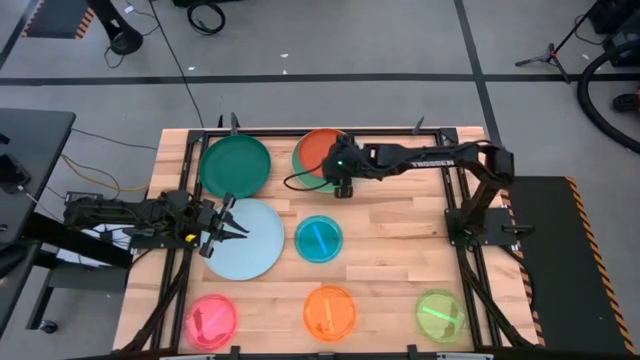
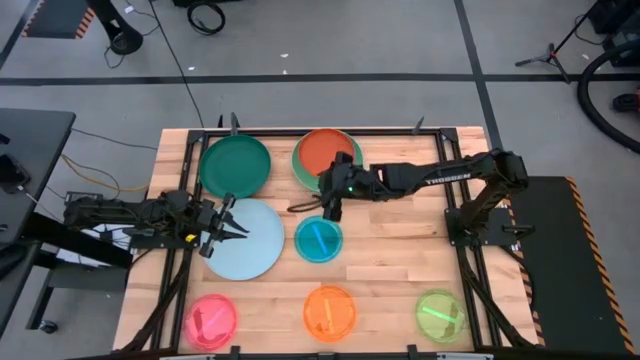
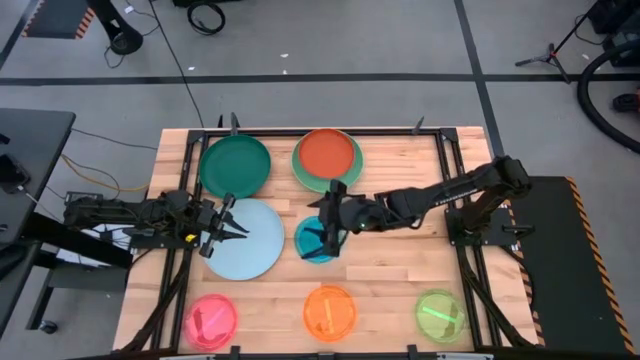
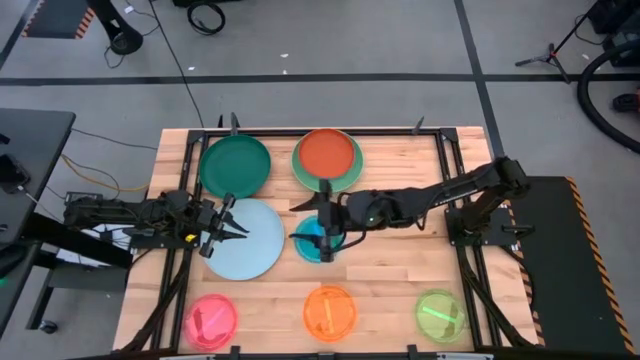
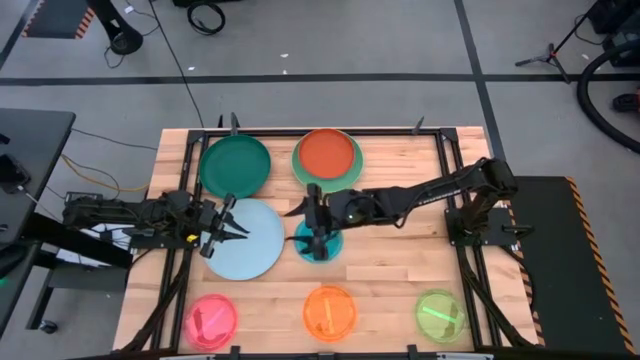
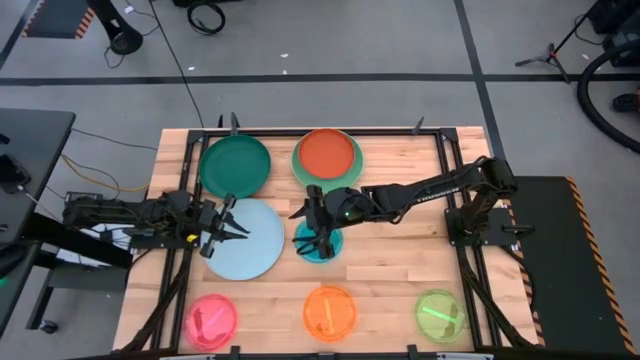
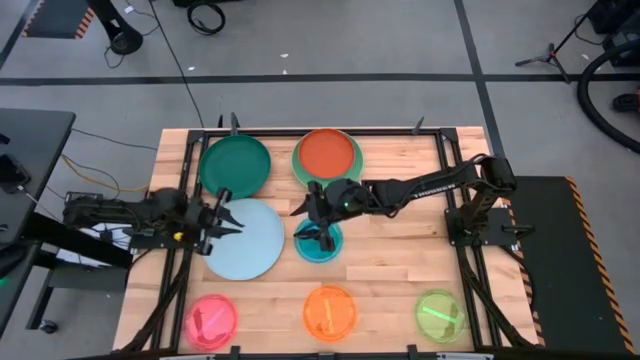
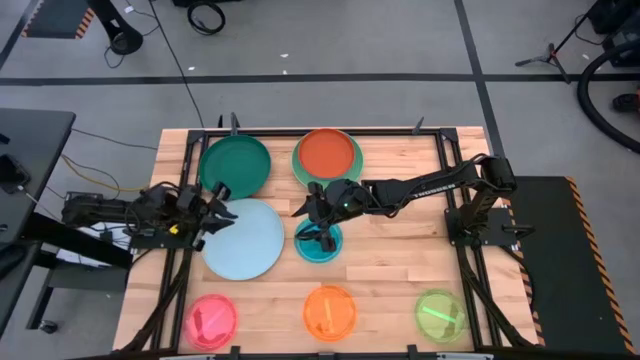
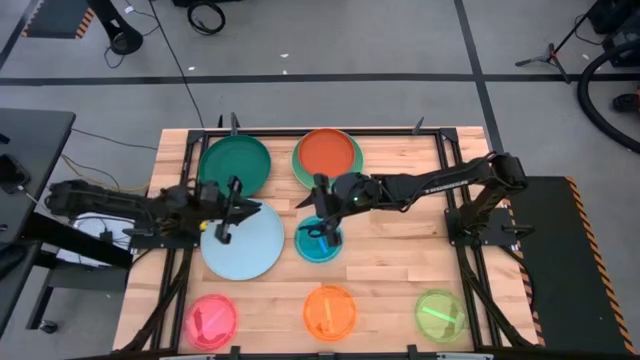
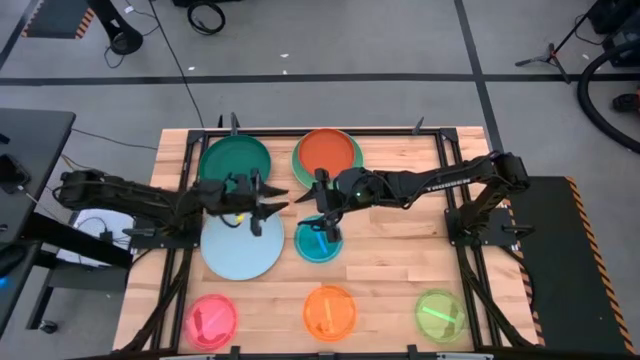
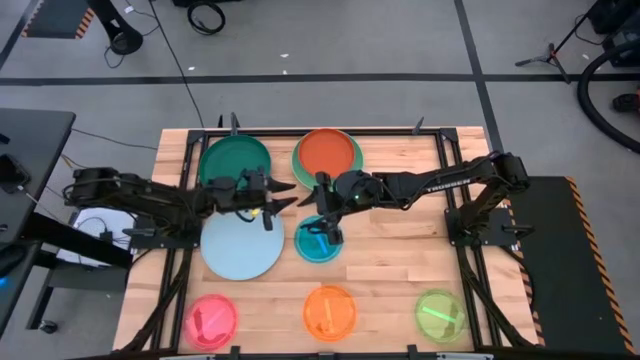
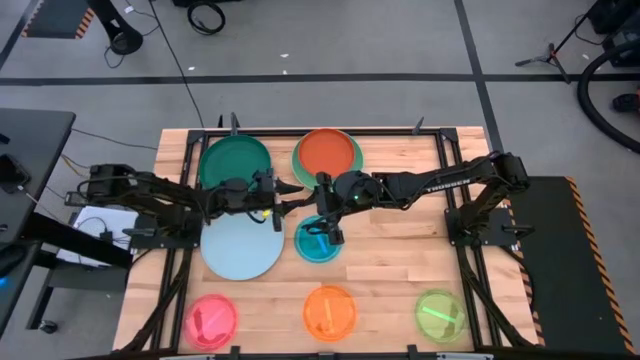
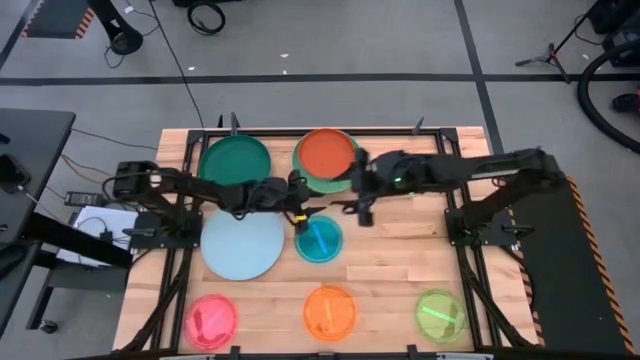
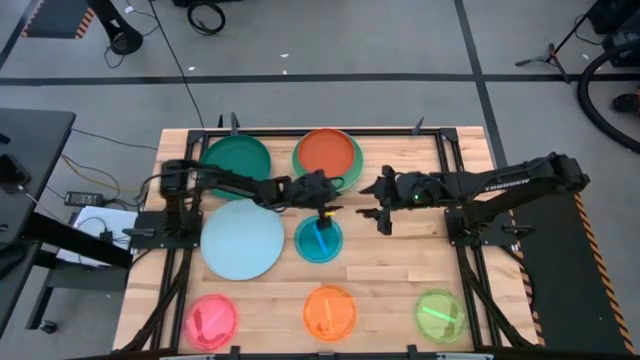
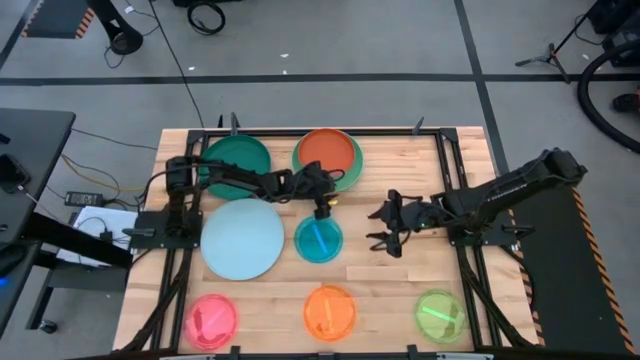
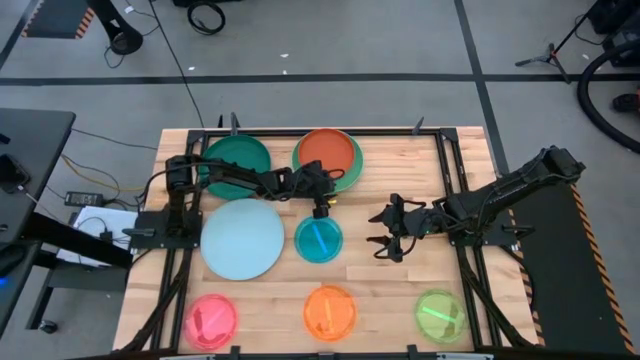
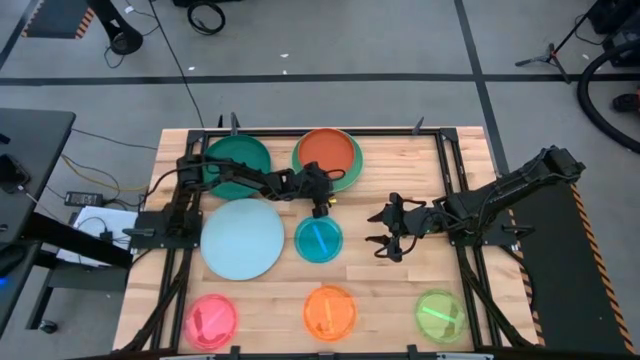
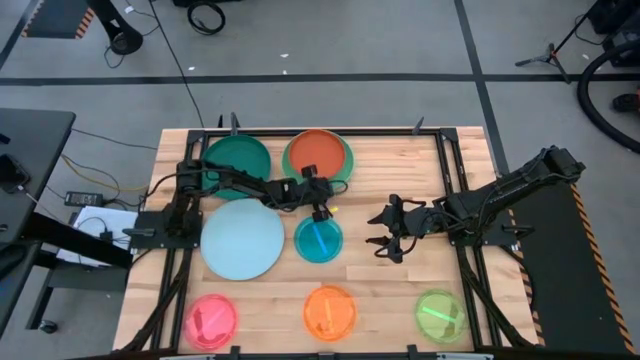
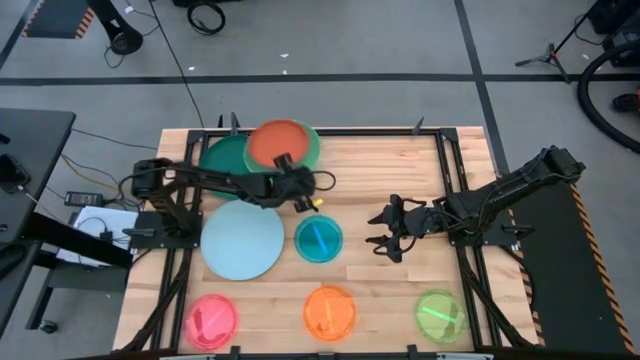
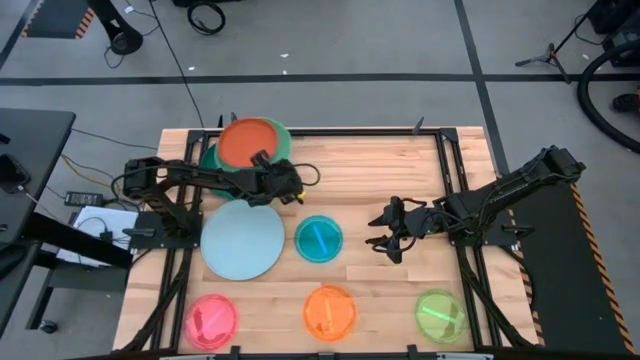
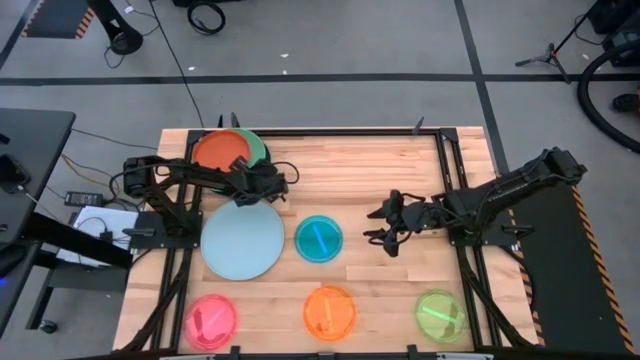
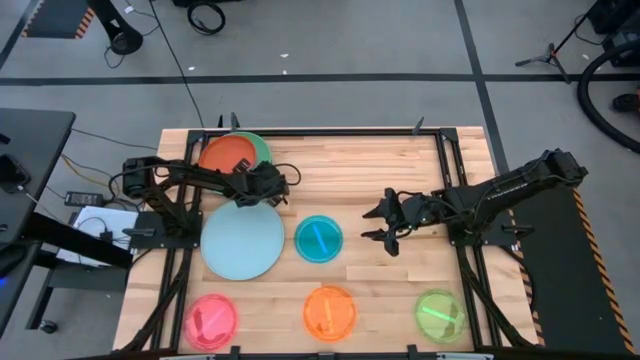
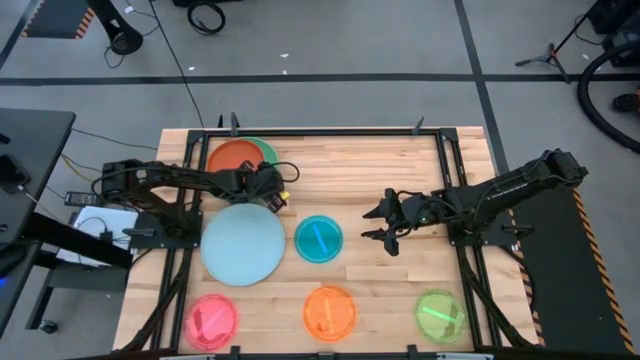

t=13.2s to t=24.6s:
Task: Stack plastic plates
Stack the stacked plates on top of the dark green plate

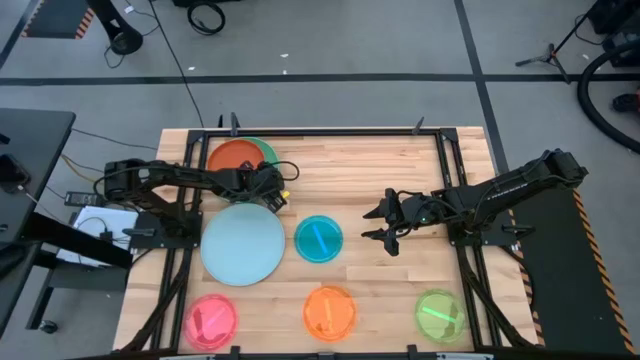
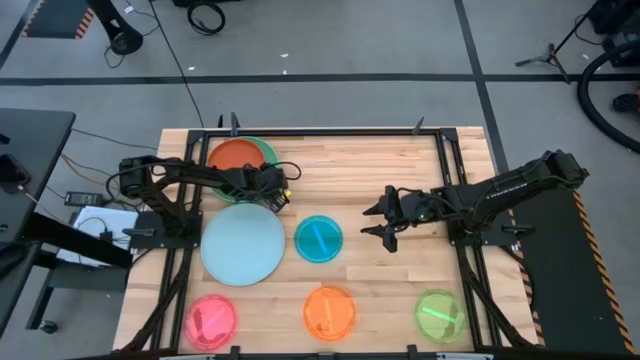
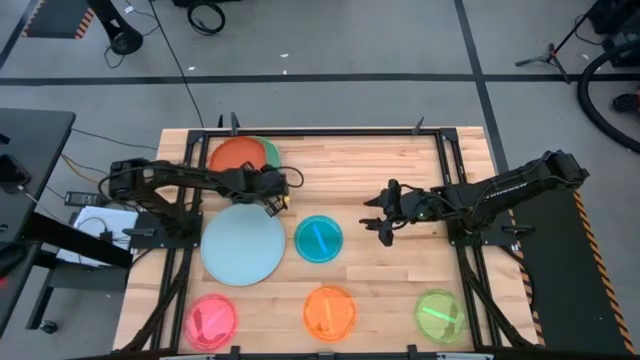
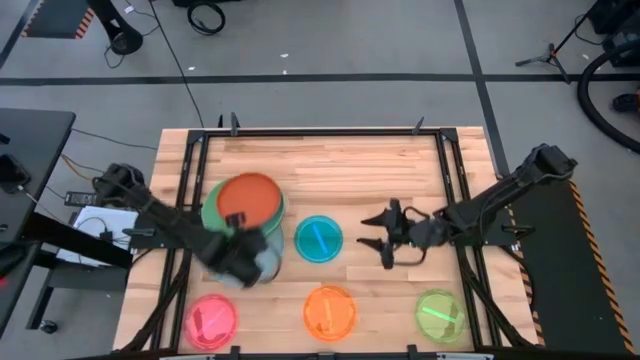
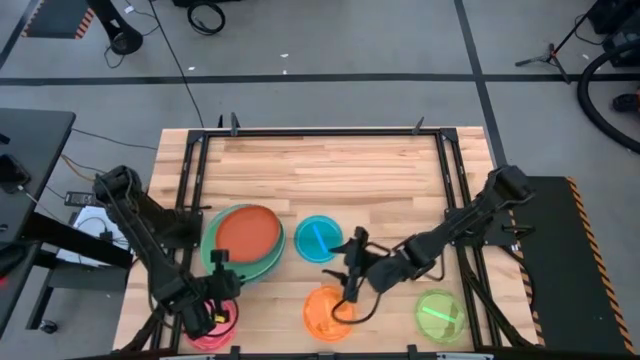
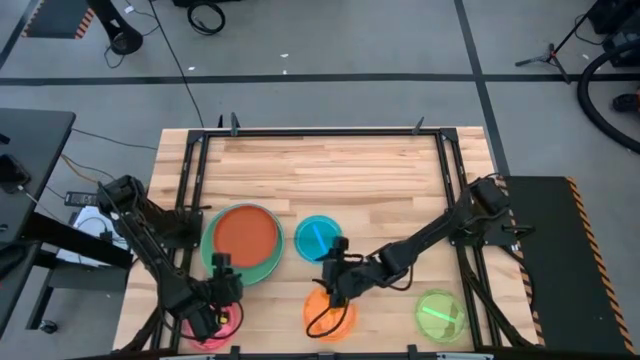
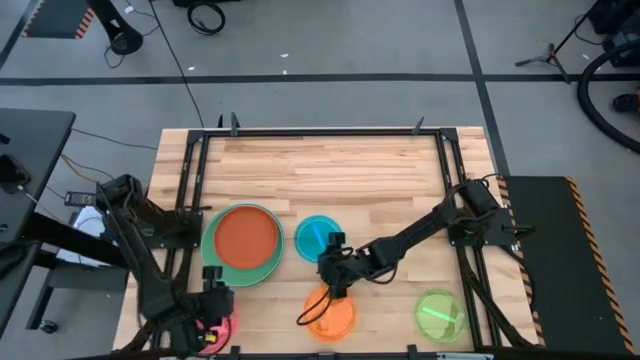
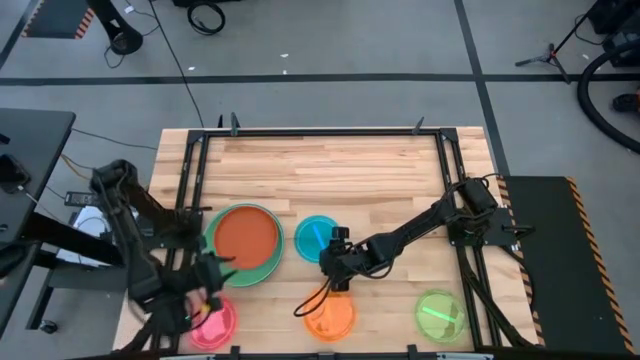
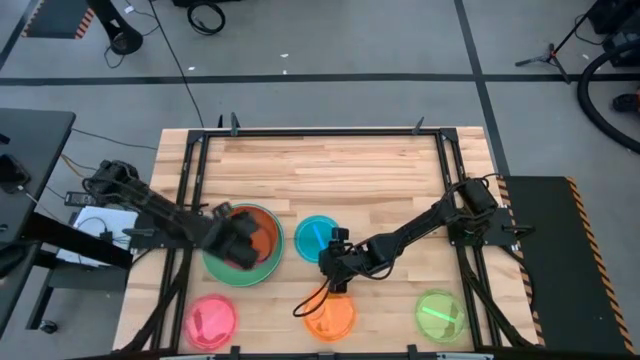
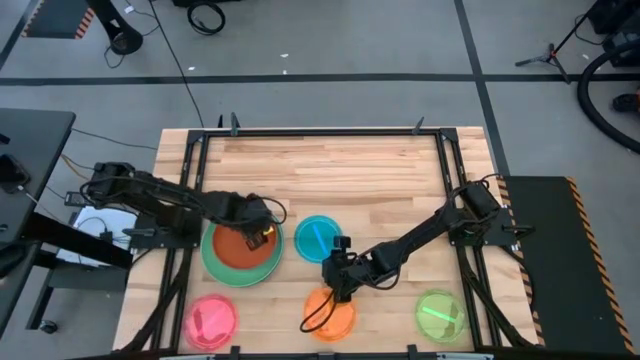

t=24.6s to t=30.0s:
Stack the stacked plates on top of the large light blue plate

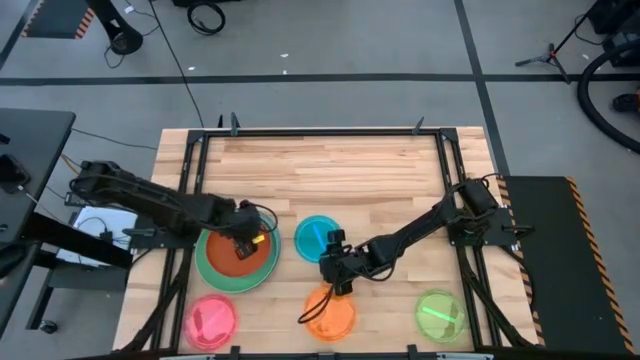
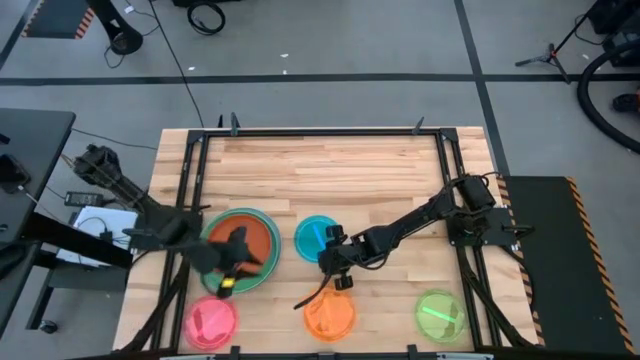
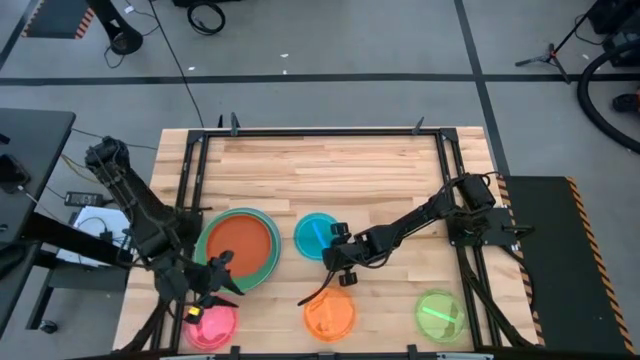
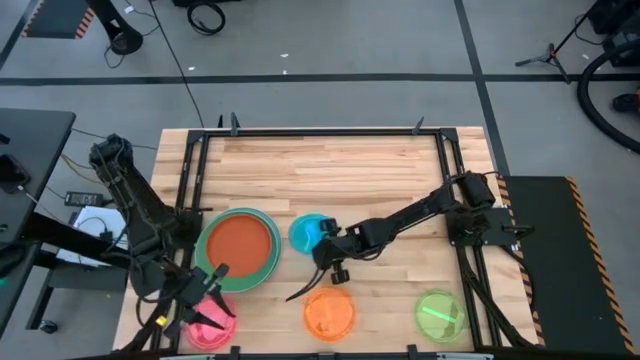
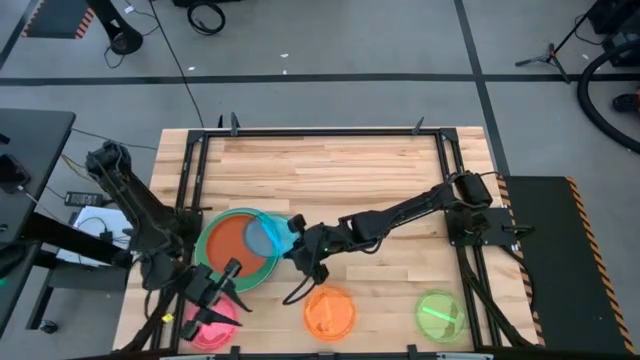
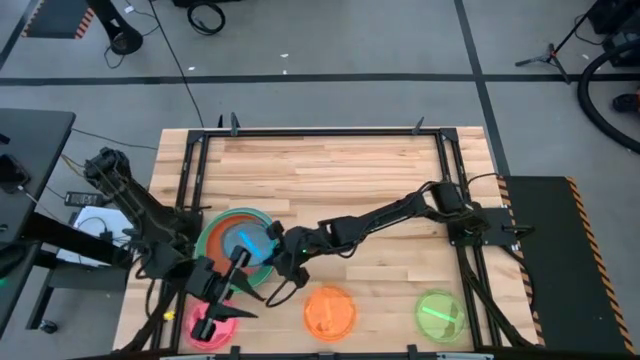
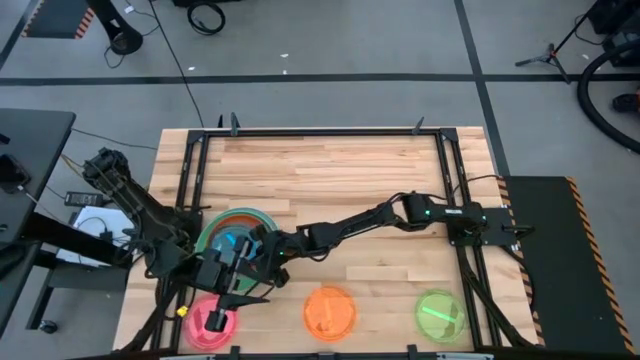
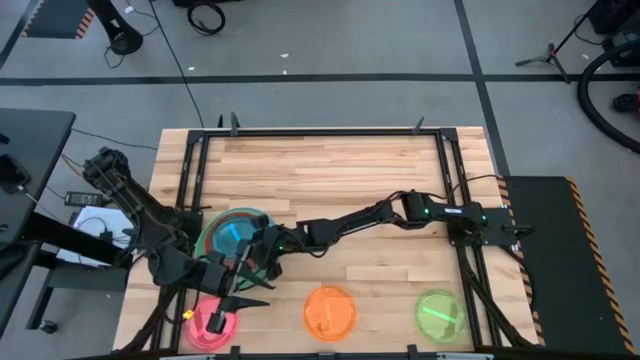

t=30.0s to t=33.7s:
Stack the small light blue plate on top of the orange plate
